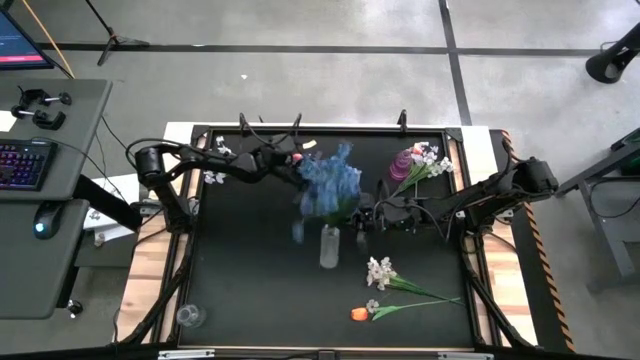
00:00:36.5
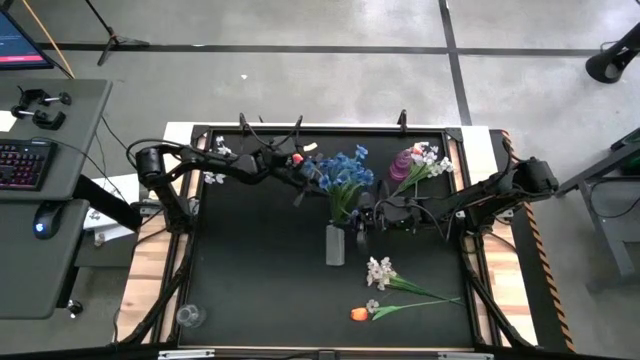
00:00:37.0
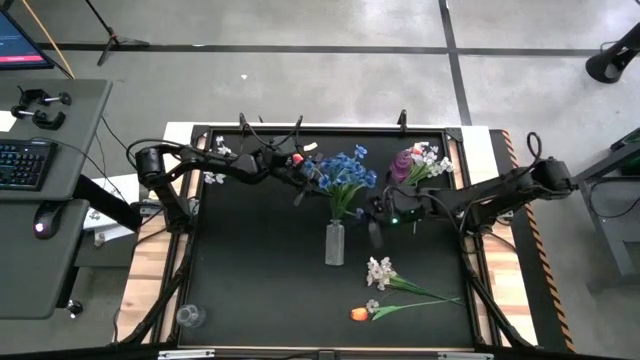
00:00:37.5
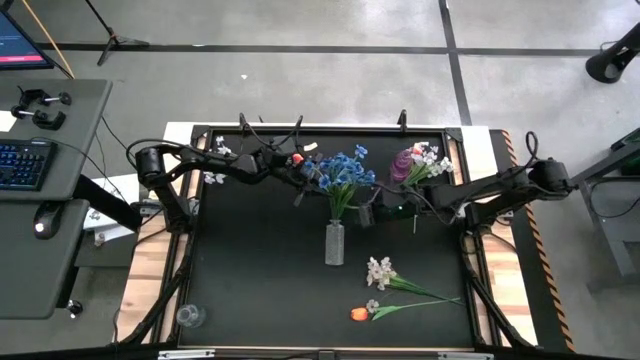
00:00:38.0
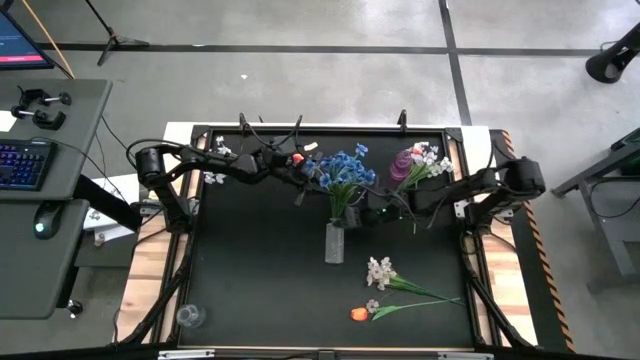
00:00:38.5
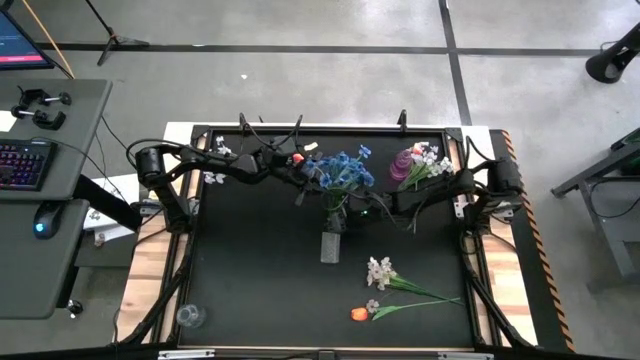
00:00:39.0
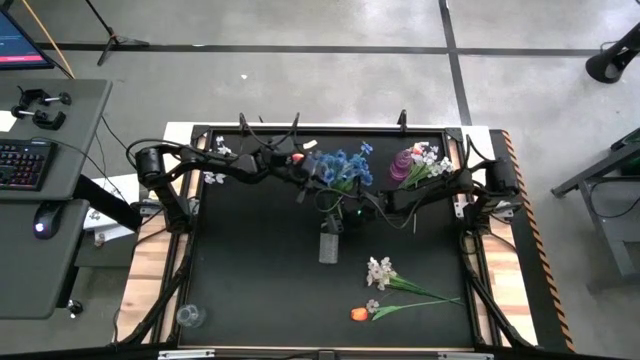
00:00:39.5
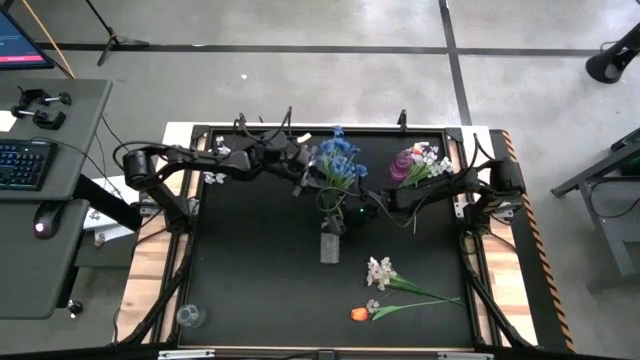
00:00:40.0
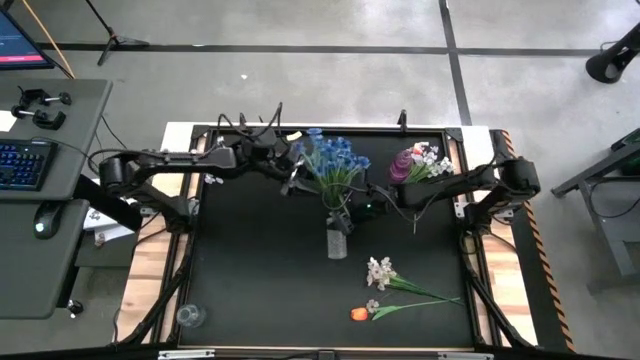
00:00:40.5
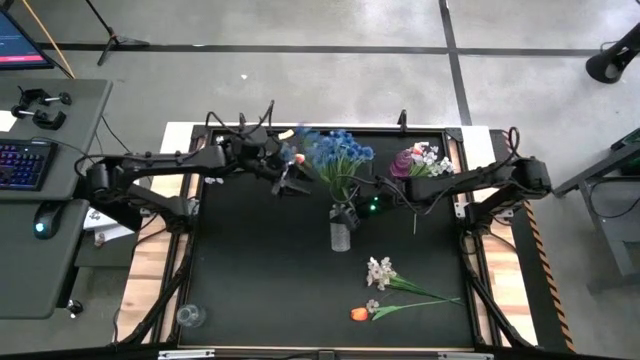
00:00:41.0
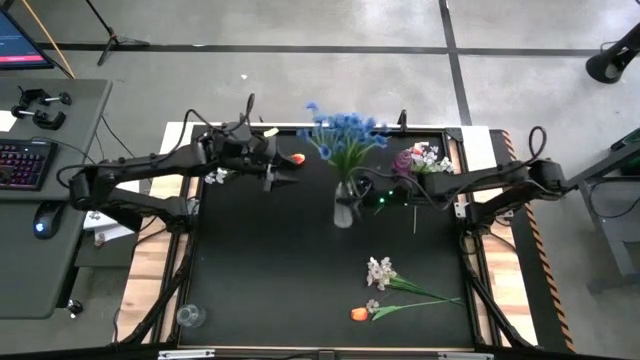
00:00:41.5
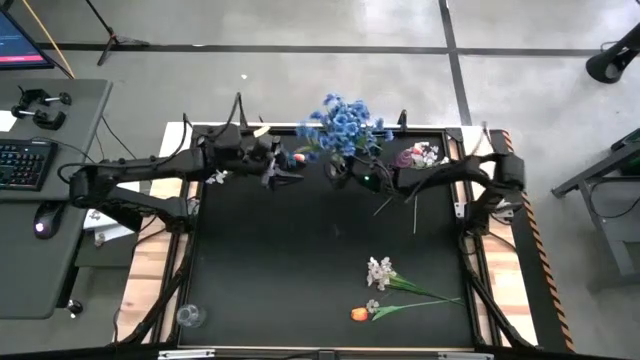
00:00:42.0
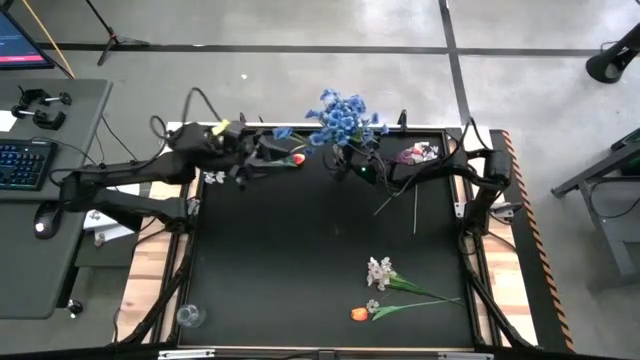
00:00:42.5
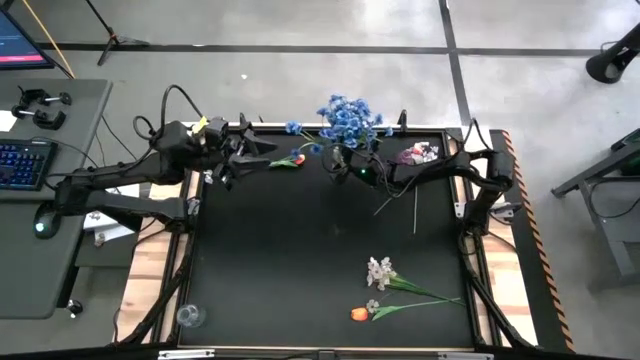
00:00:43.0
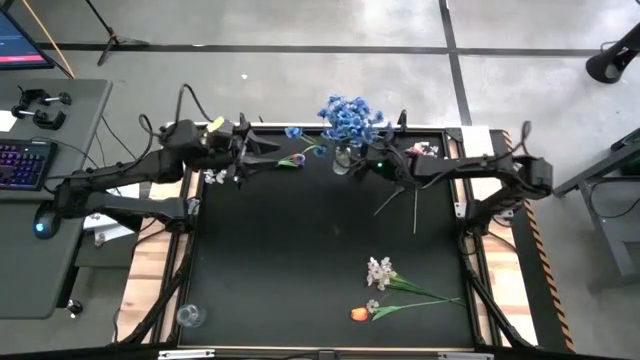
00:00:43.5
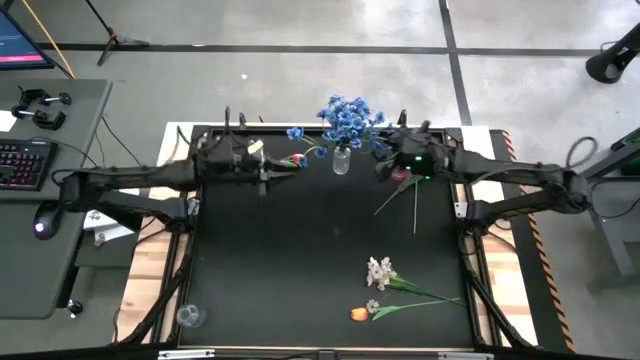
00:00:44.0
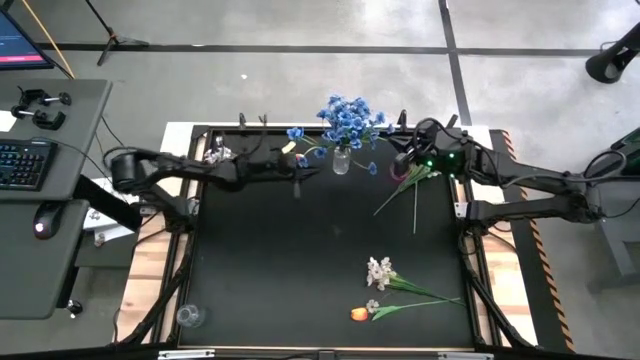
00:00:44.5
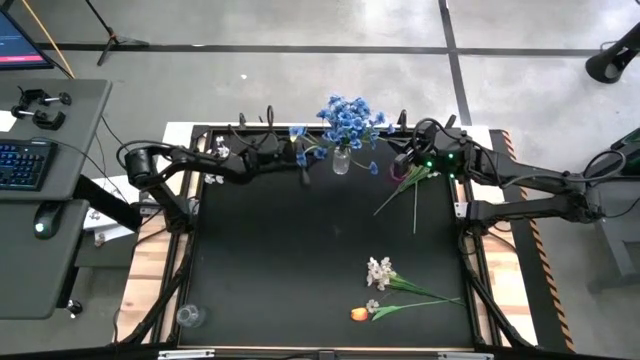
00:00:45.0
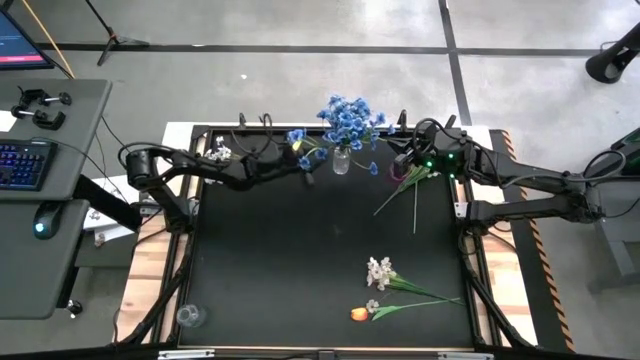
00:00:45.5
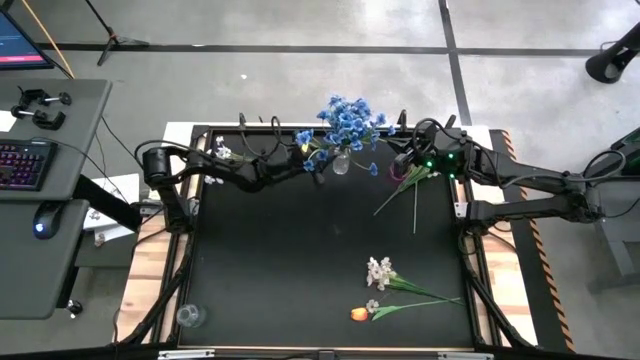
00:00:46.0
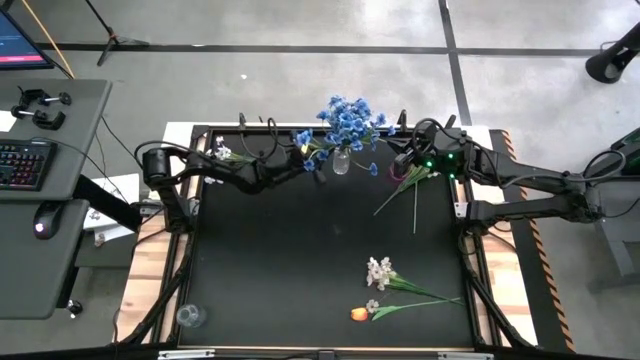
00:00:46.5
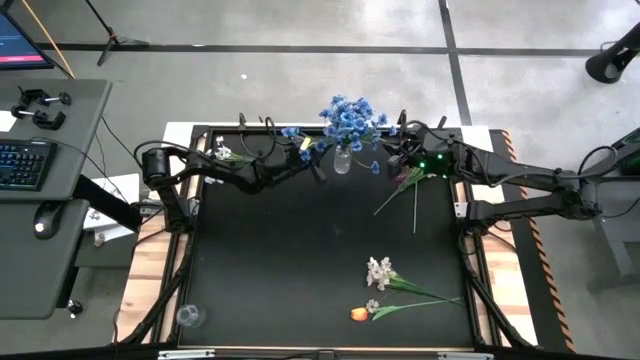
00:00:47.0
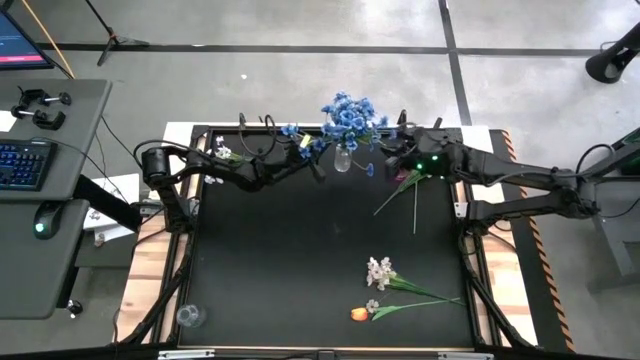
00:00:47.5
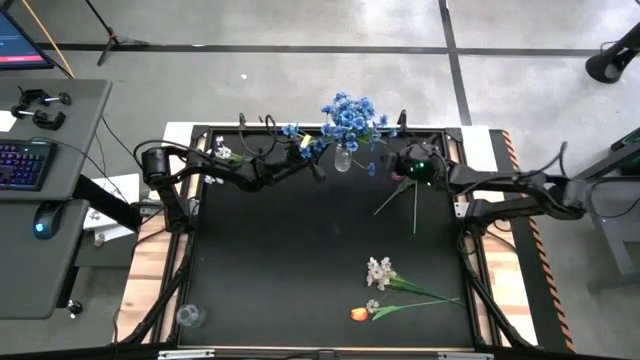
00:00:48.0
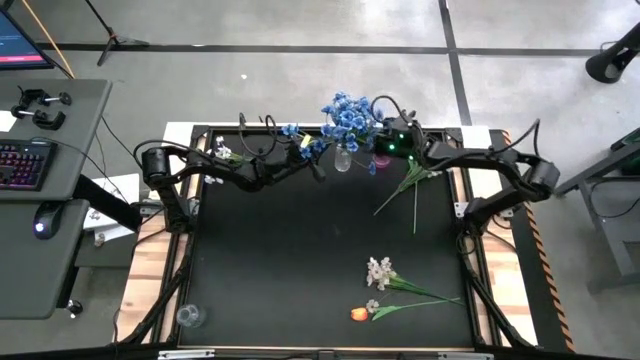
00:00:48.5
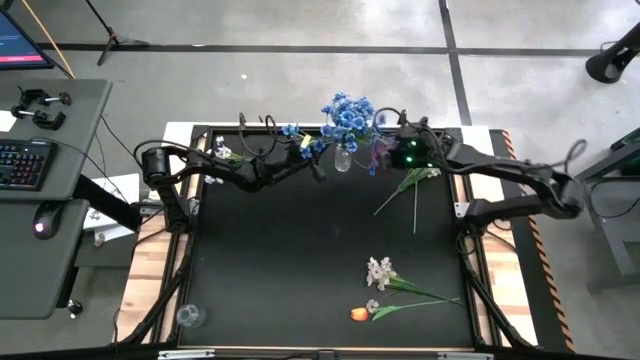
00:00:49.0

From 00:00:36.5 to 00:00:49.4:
Task: Sort flowers into vase by color
Adjust the top transparent vase

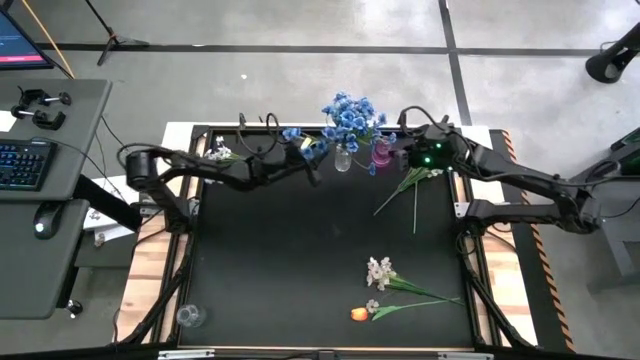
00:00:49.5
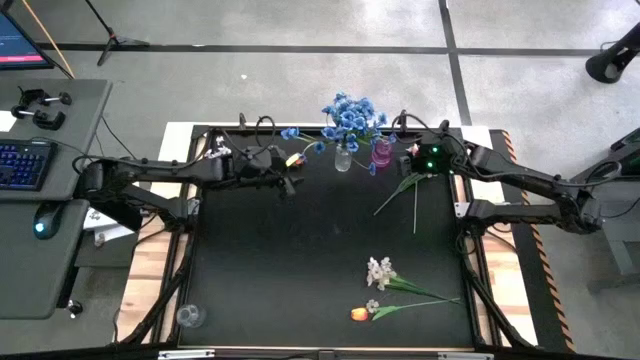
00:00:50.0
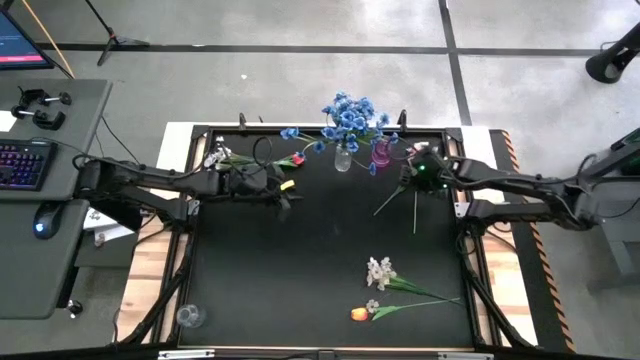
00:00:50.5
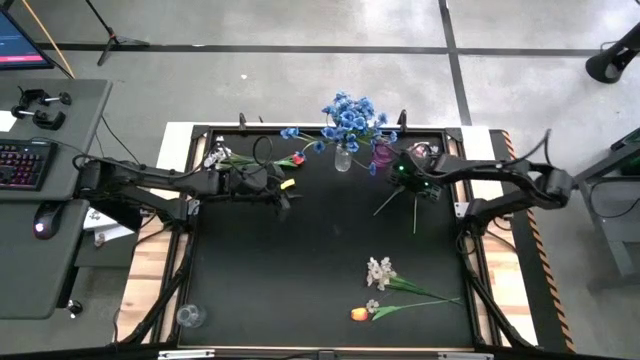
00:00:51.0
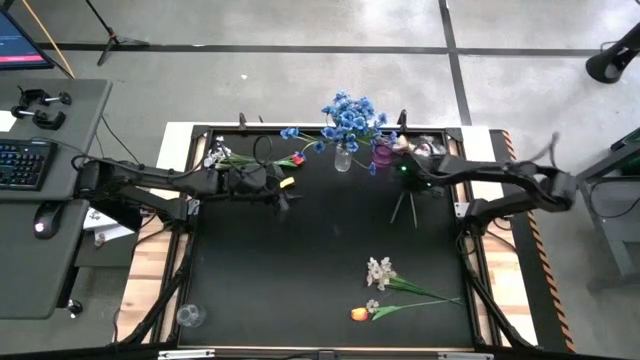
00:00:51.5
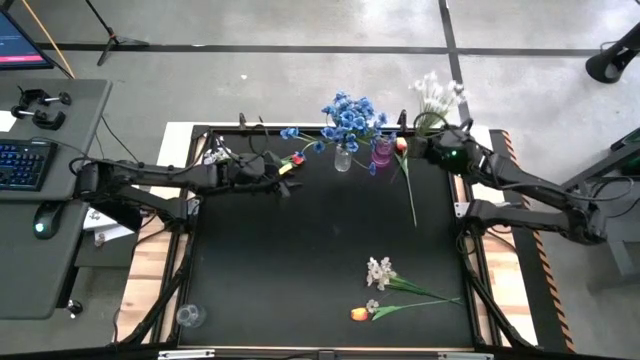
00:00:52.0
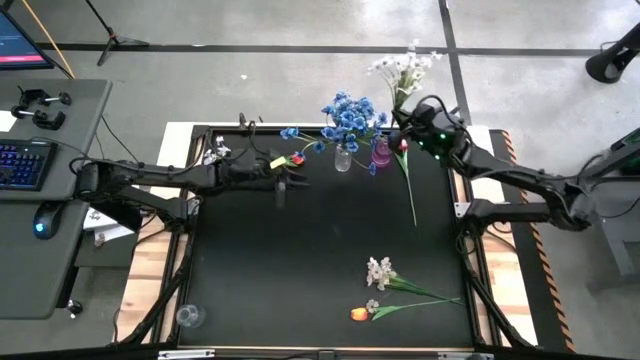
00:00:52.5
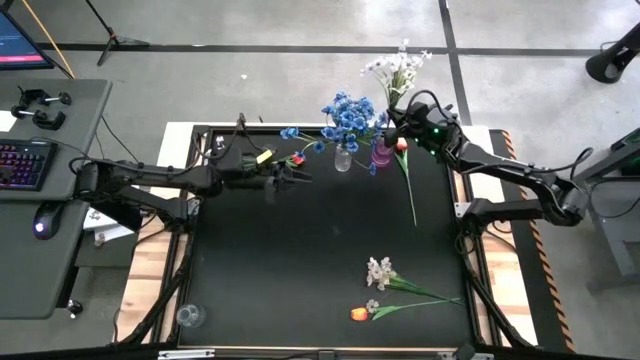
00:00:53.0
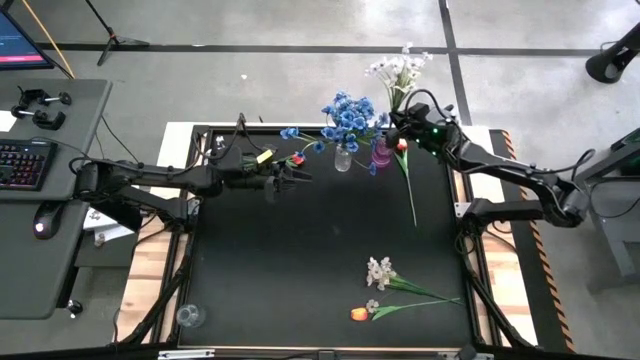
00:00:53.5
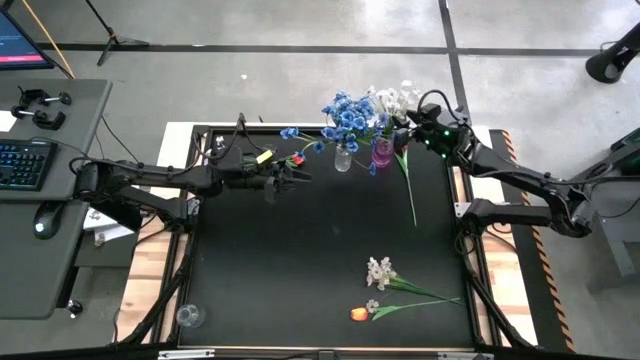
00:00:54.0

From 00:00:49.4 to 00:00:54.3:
Put the top right white flowers into the purple vase
